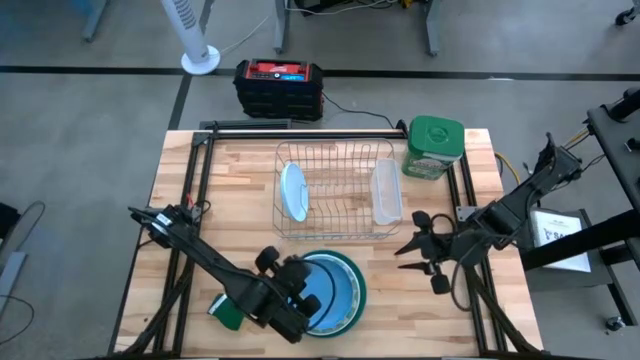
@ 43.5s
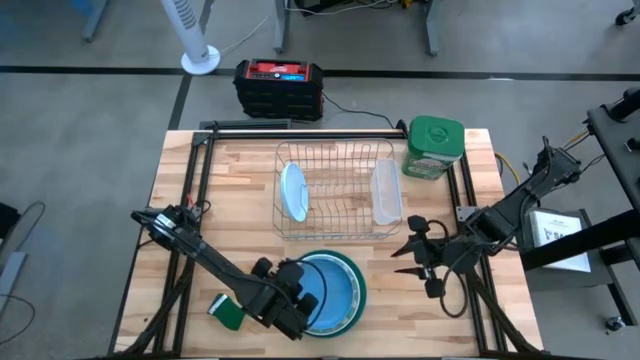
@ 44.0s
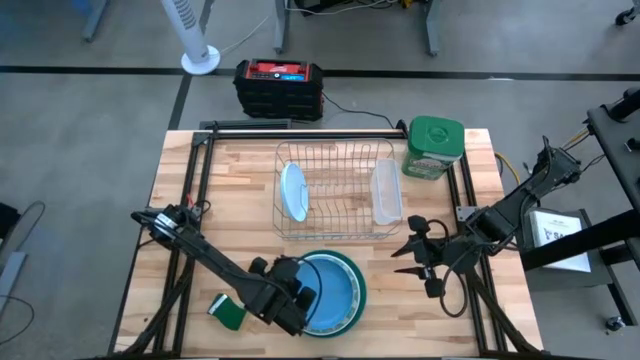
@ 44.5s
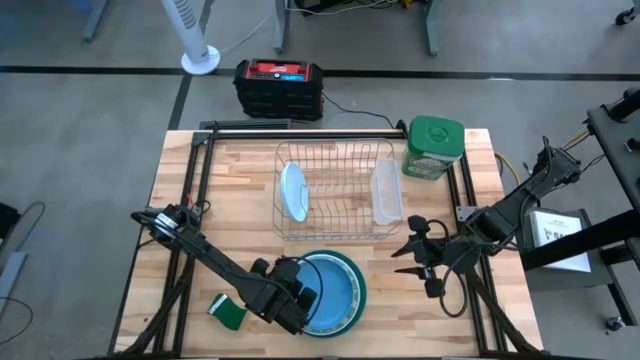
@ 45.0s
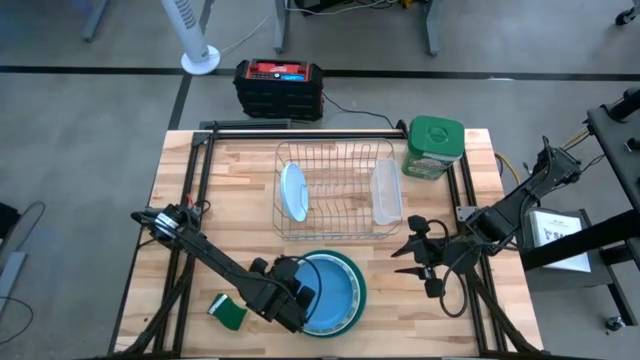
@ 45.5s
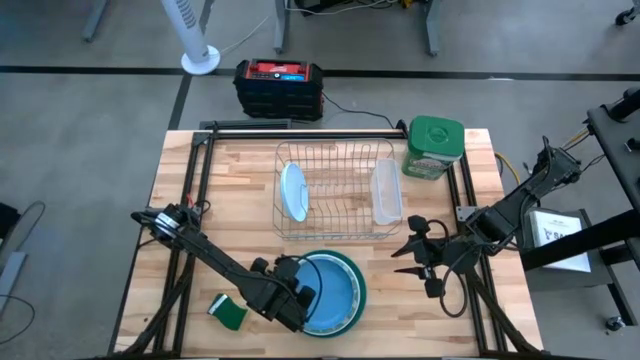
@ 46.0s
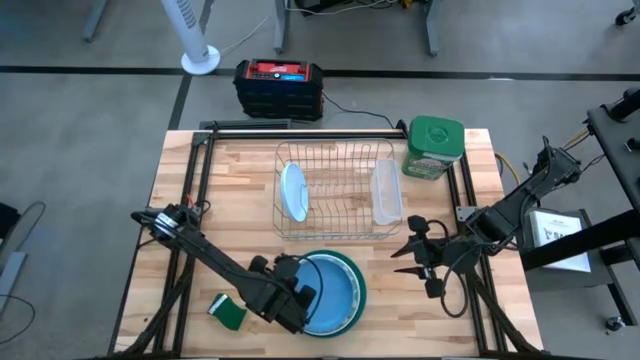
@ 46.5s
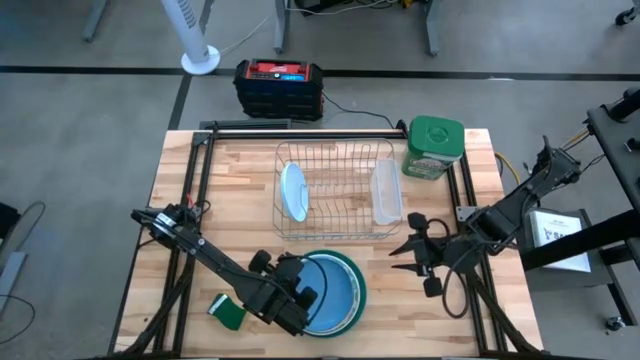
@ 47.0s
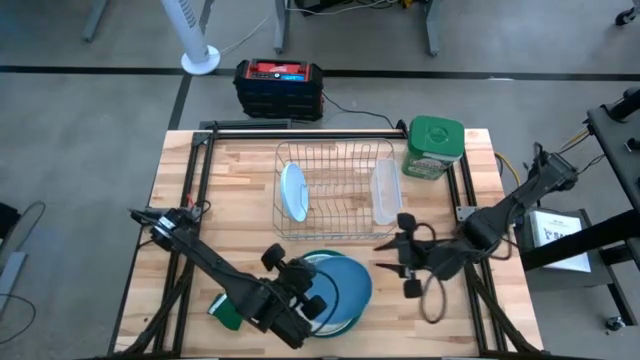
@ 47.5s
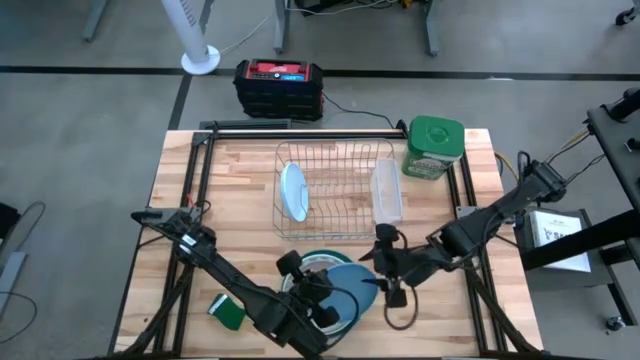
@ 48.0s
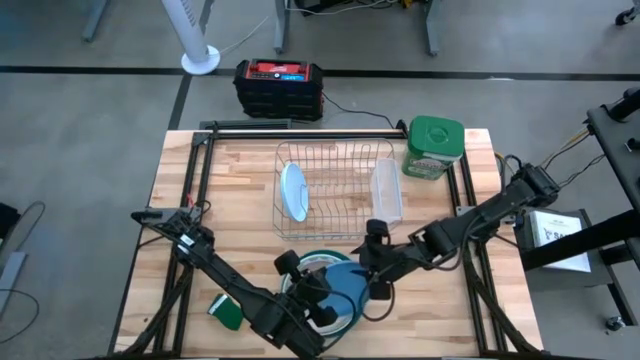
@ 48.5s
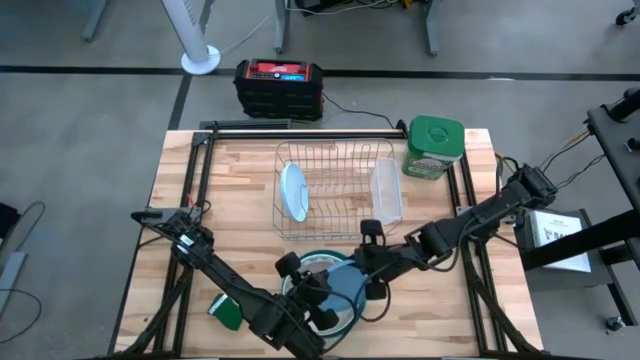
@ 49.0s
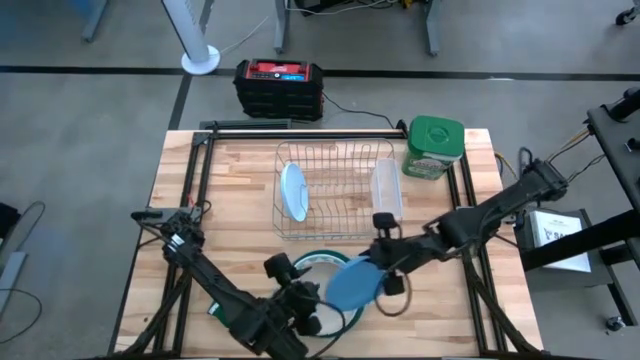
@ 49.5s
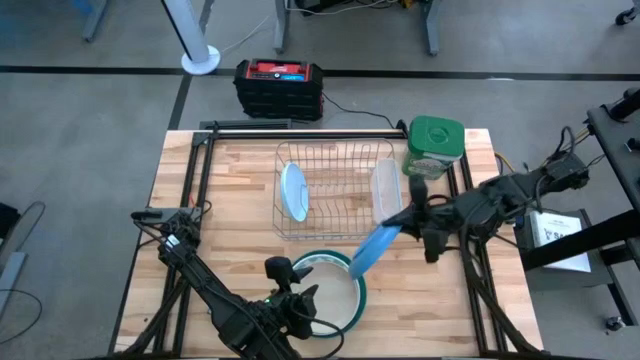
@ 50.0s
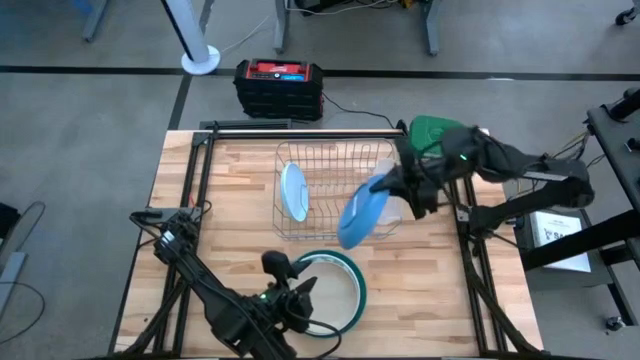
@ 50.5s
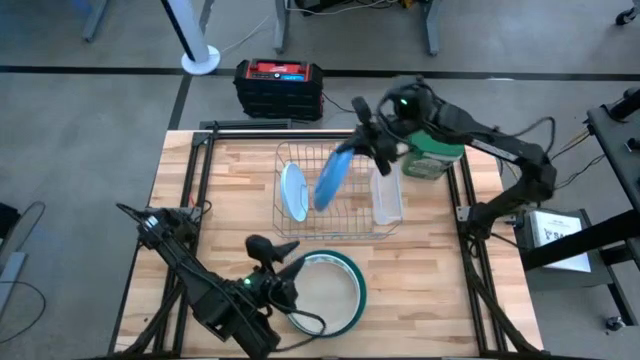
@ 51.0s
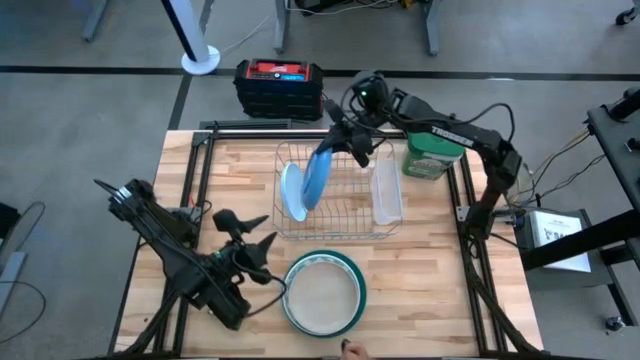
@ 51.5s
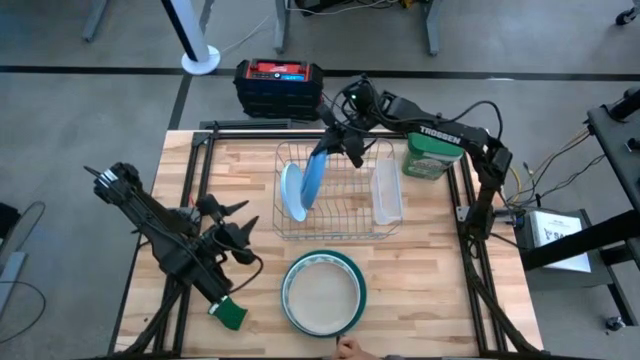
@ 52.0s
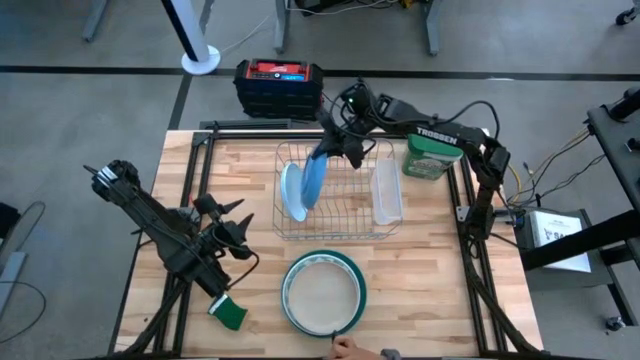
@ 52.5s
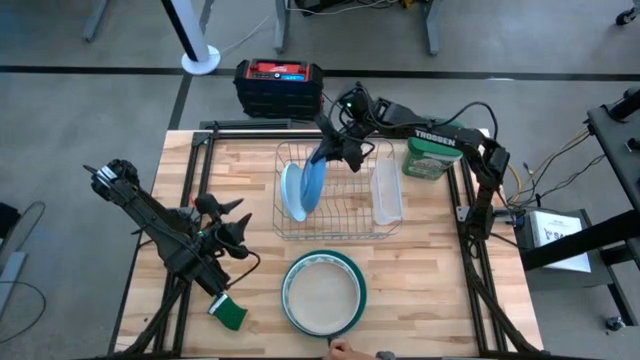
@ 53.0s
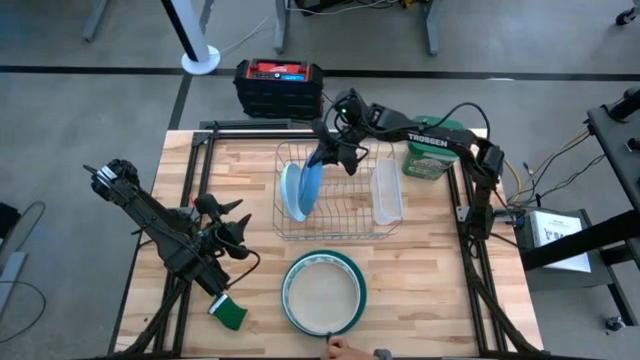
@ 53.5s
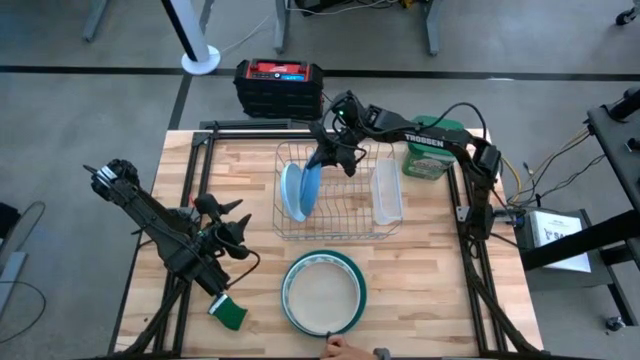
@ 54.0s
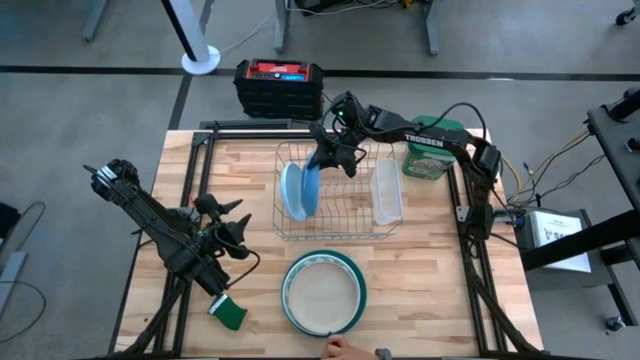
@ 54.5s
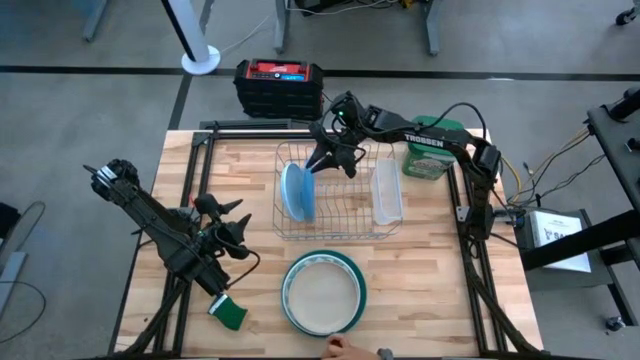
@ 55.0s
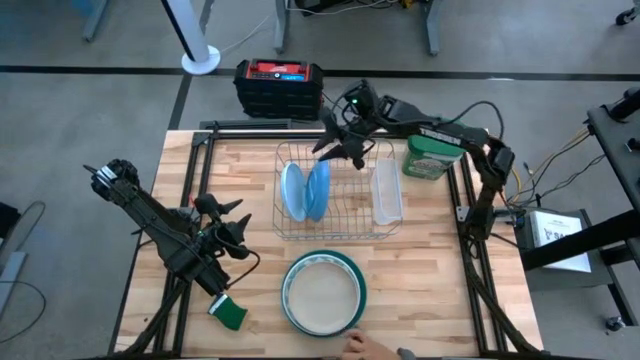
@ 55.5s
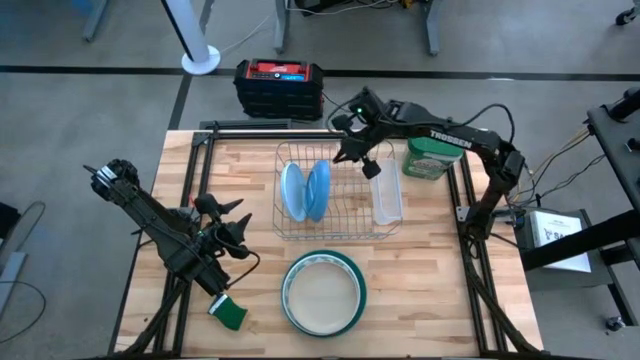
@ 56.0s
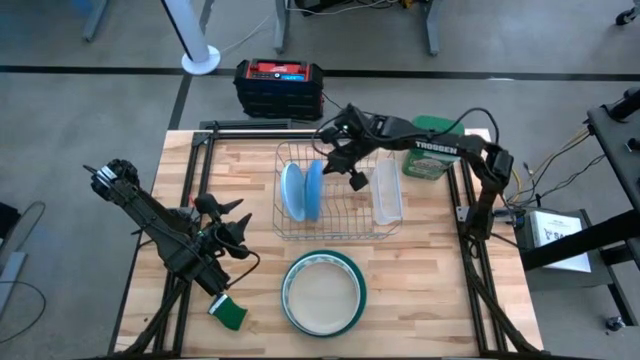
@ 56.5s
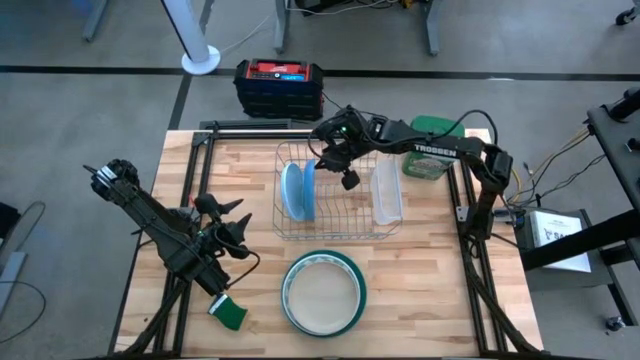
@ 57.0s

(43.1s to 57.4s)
Task: Sort dishes
Put the blue plate in the dish rack

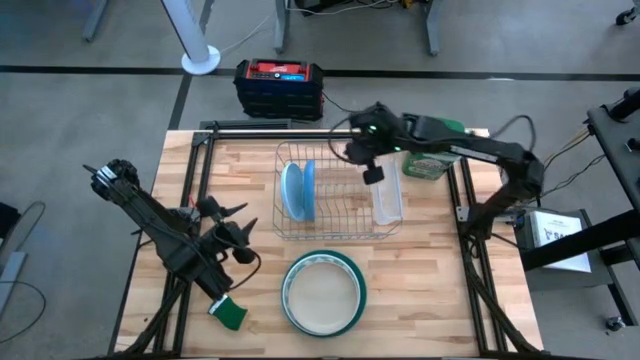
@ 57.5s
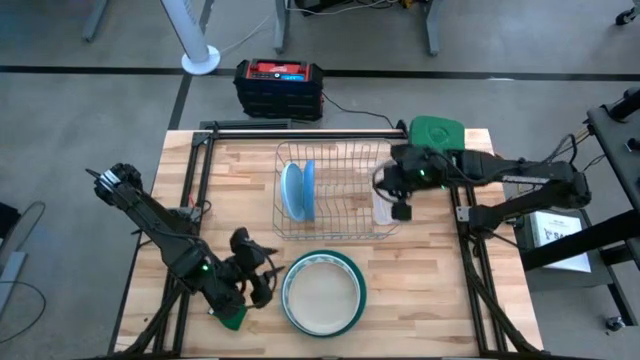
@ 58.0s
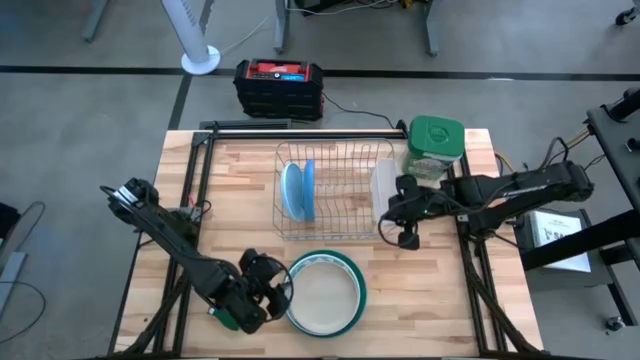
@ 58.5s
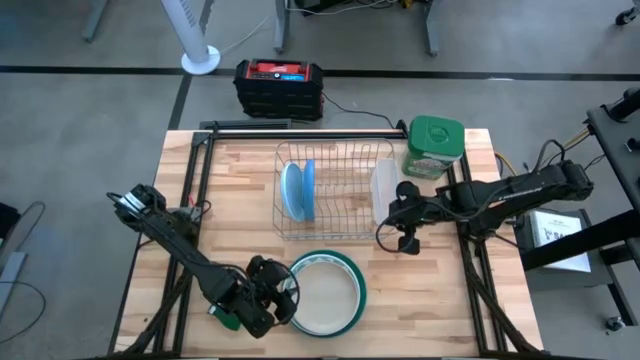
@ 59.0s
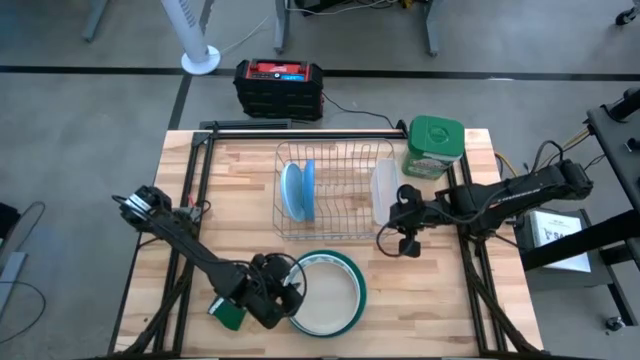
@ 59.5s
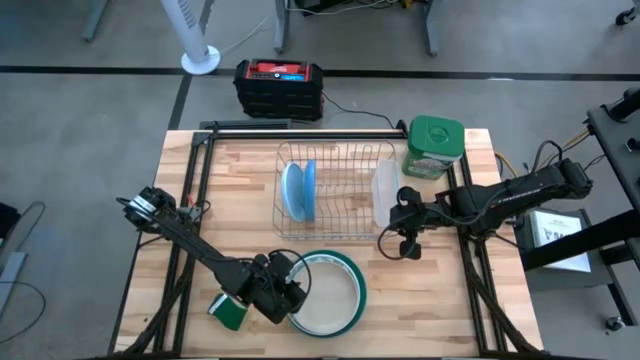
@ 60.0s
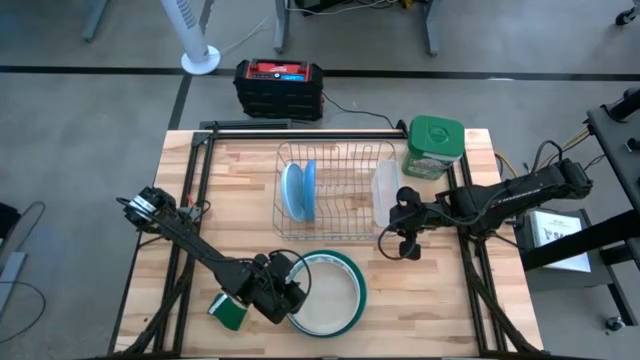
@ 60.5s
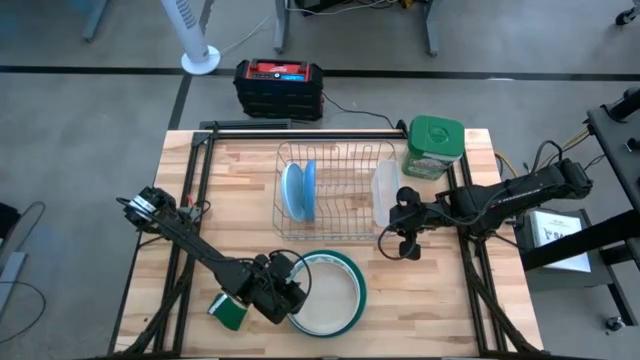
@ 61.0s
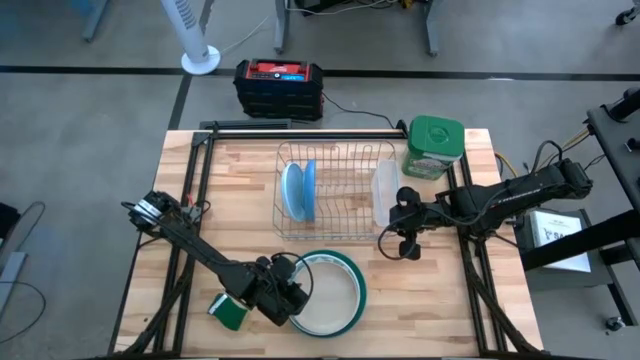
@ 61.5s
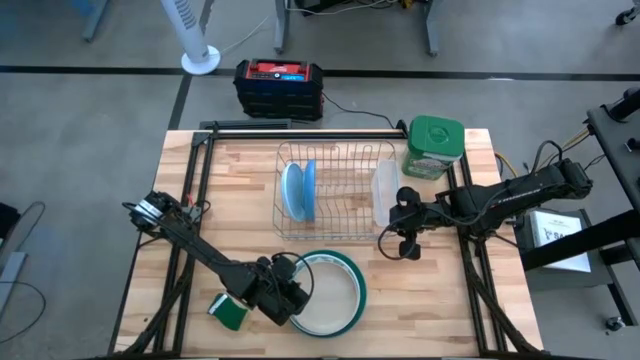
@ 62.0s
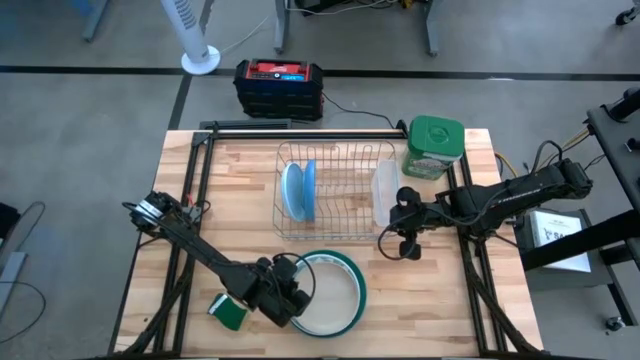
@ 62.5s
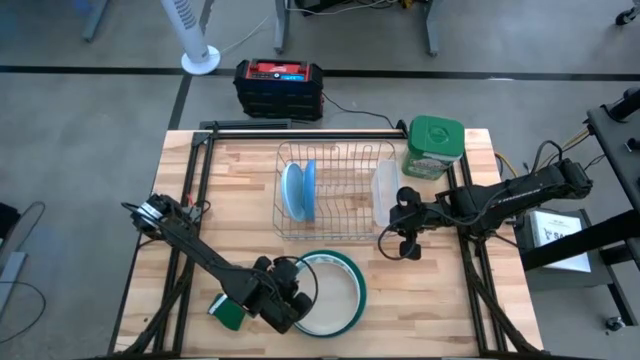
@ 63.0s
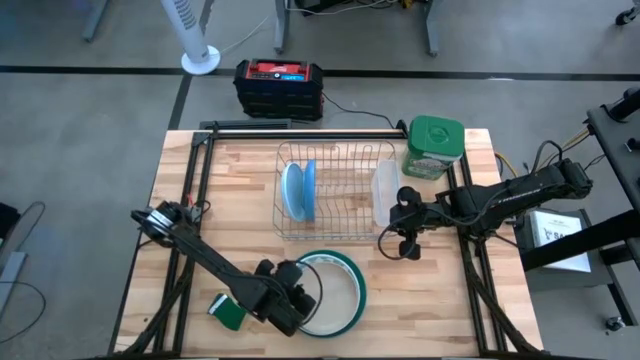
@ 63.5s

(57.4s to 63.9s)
Put the light orange plate in the dish rack
